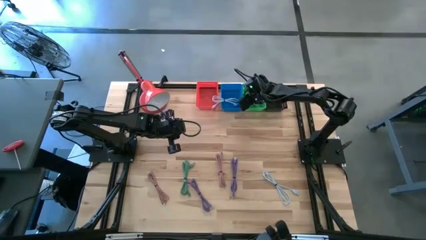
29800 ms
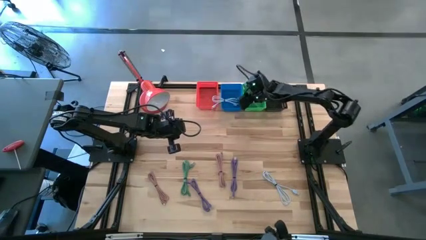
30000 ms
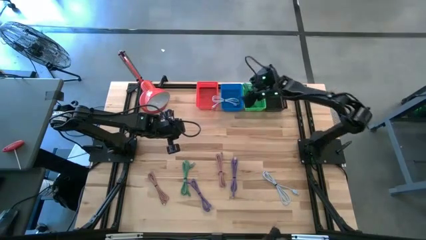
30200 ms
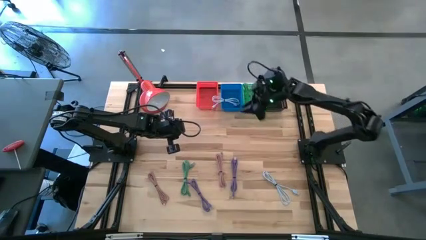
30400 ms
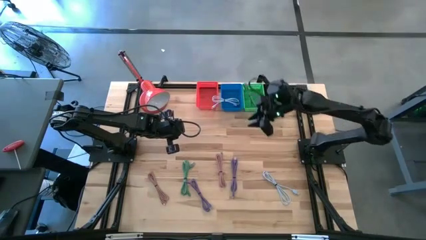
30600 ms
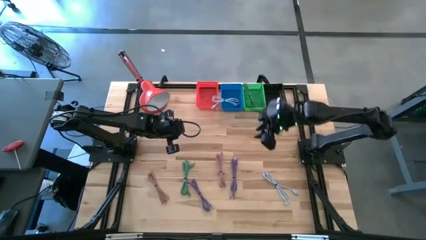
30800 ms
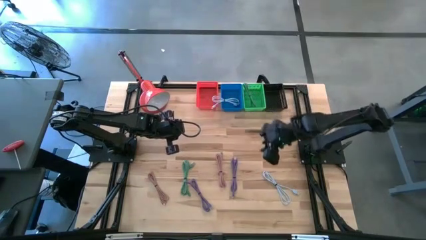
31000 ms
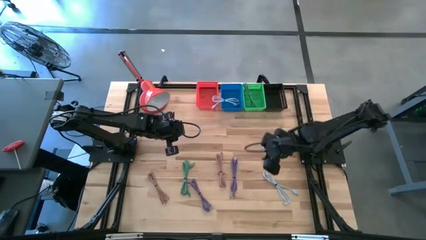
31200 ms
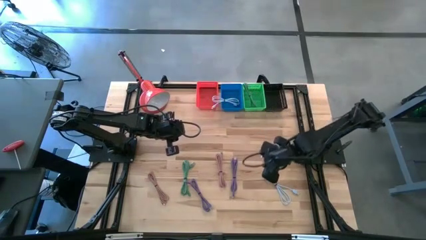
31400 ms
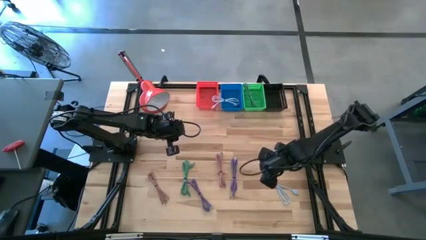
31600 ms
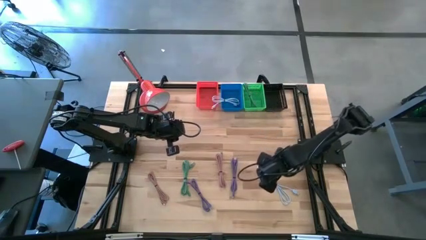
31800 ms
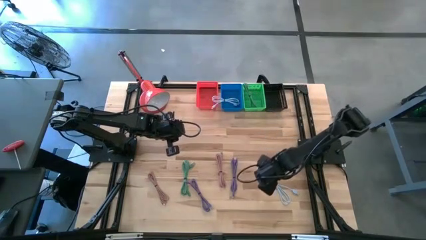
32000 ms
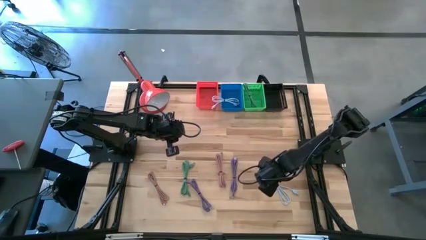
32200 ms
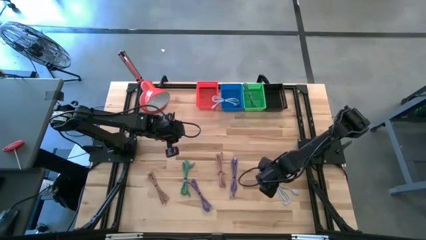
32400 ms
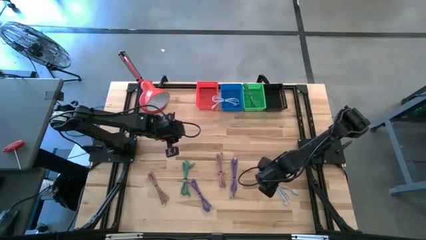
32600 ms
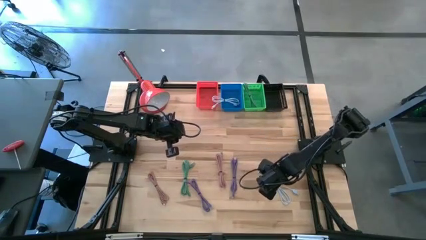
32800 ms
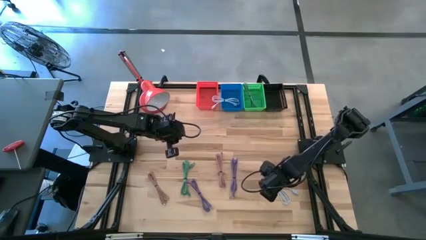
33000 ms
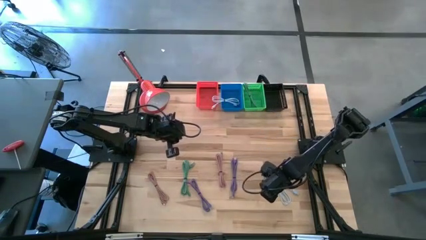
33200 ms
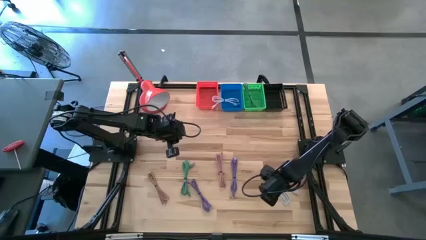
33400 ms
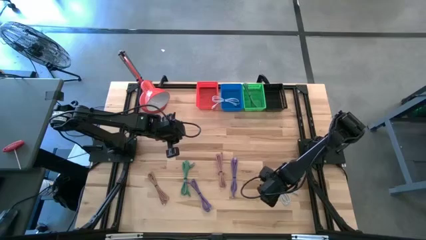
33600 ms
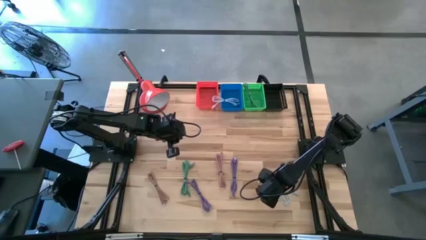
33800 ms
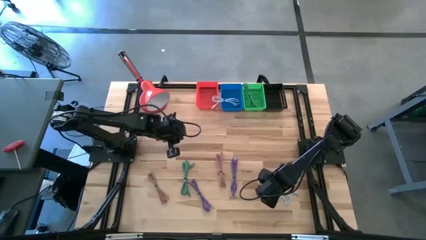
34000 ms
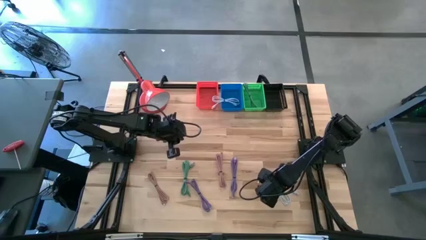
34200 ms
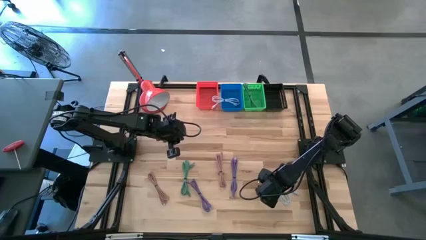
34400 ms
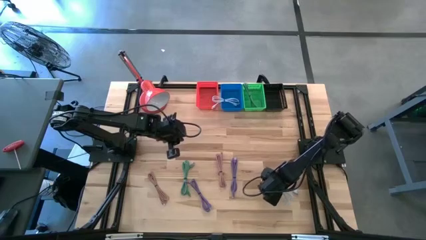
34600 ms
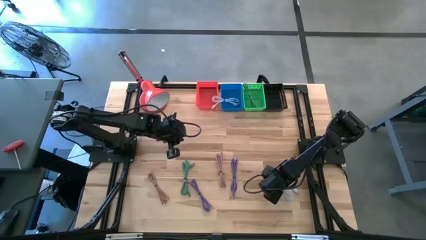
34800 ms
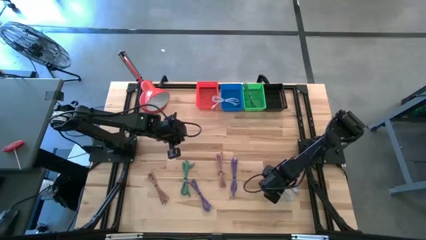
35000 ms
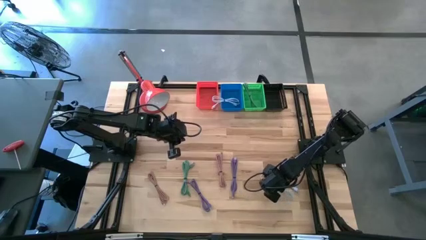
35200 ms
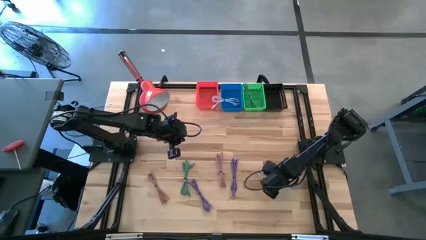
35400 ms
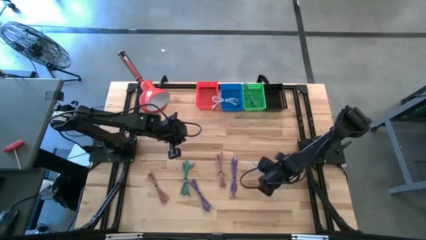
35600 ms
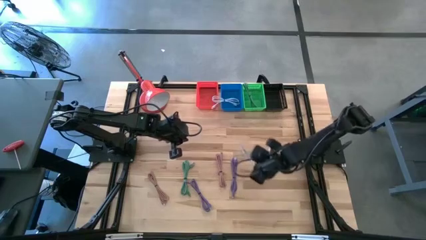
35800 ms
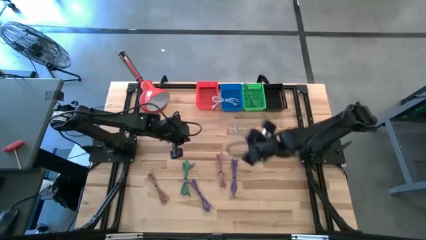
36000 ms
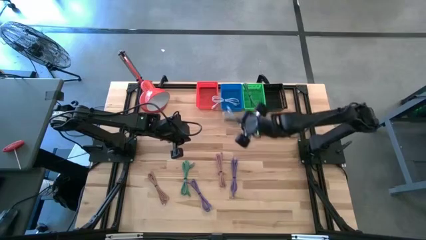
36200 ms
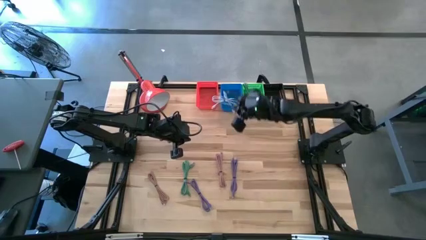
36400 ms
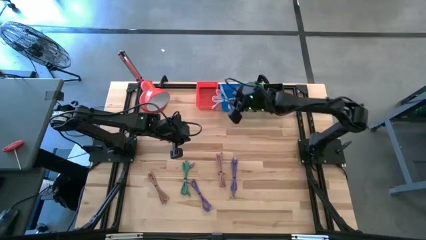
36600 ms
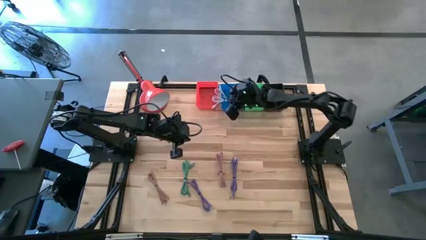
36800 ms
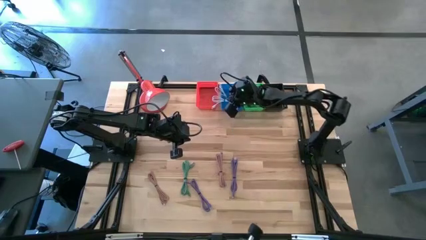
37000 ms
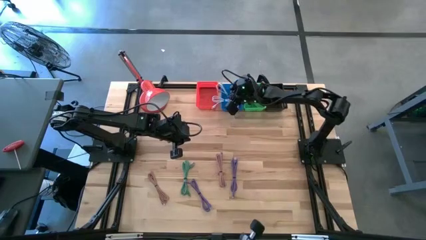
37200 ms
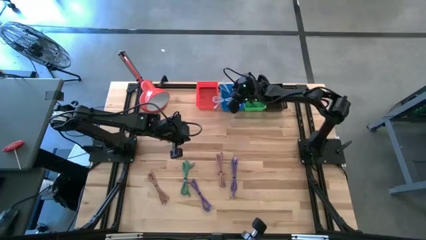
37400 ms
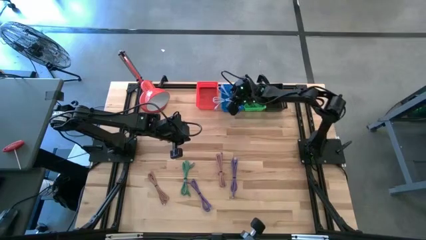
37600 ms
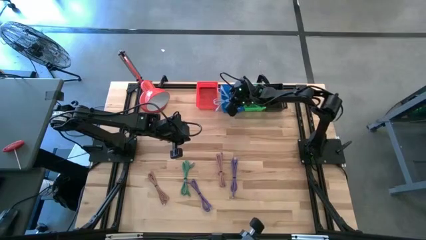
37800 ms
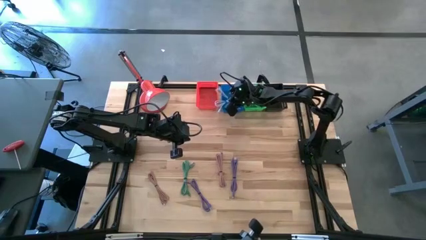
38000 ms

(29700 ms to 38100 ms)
Task: Pick & Place USB Port
Put the blue charger cable into the blue bin

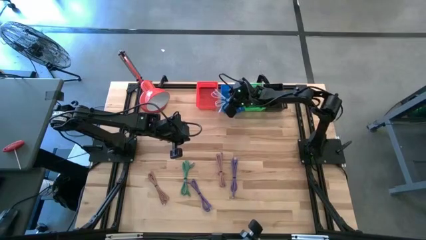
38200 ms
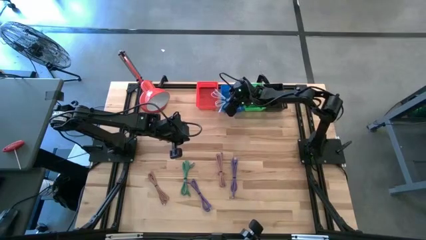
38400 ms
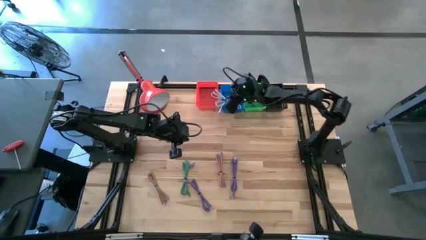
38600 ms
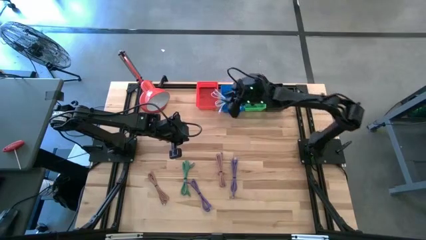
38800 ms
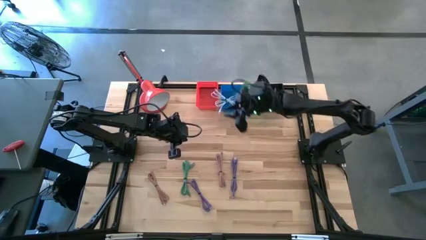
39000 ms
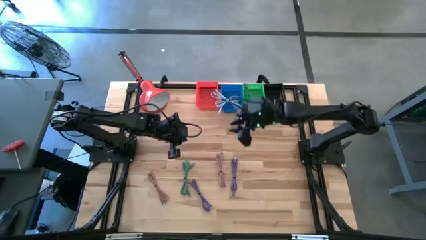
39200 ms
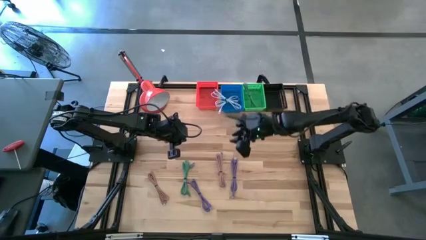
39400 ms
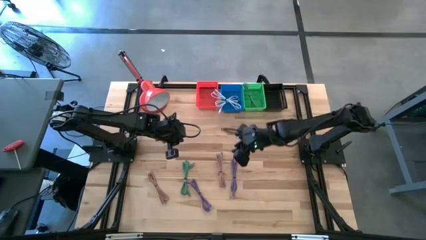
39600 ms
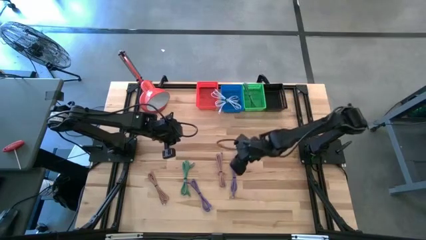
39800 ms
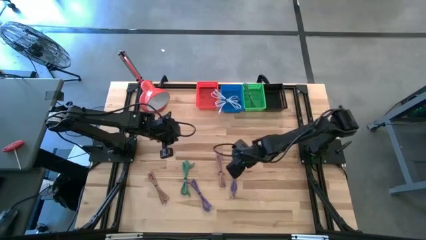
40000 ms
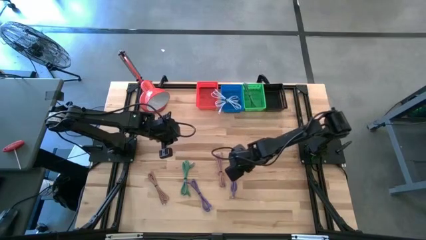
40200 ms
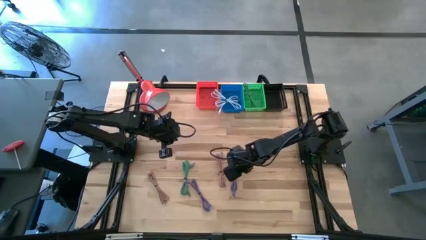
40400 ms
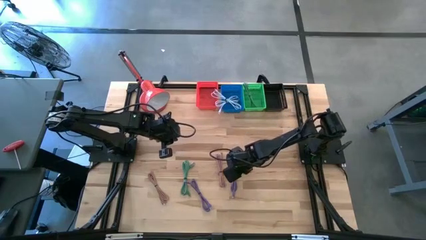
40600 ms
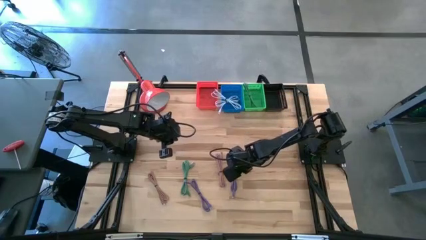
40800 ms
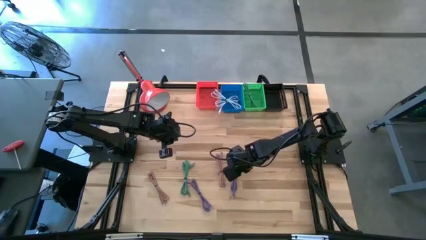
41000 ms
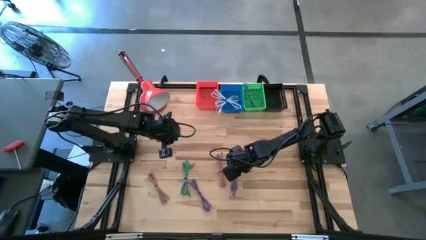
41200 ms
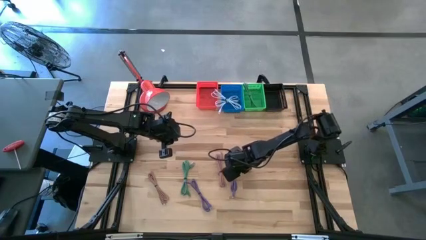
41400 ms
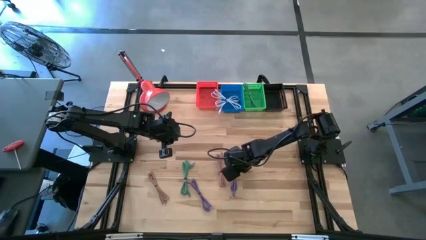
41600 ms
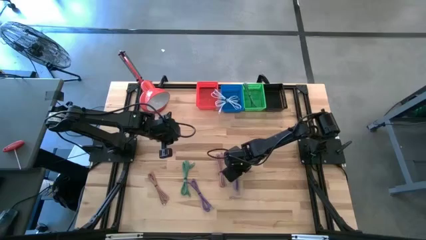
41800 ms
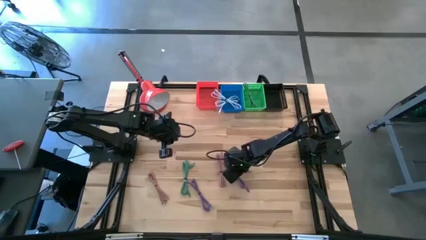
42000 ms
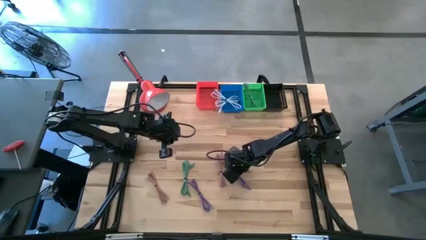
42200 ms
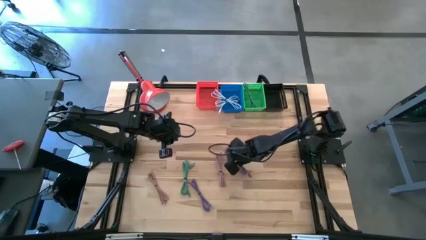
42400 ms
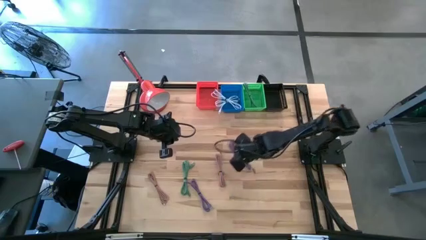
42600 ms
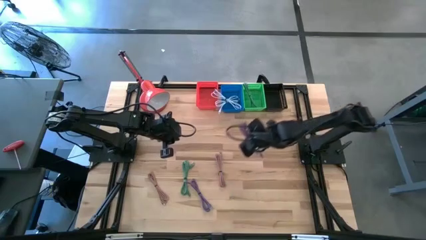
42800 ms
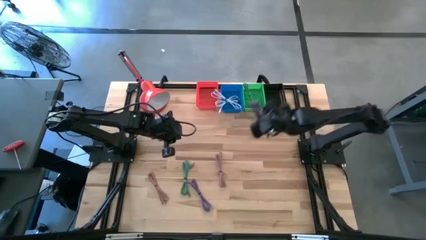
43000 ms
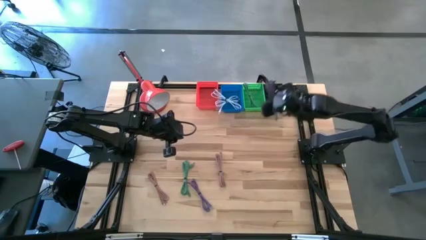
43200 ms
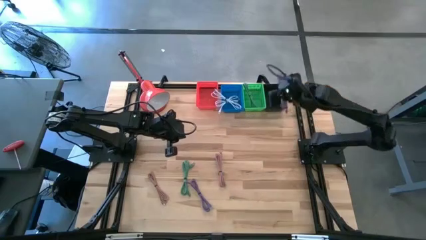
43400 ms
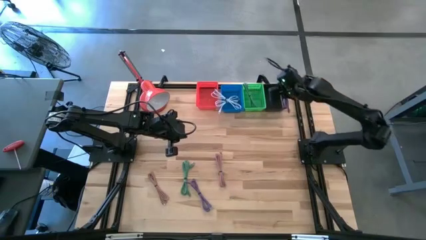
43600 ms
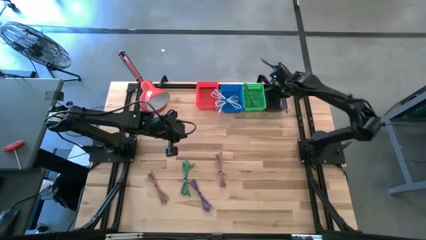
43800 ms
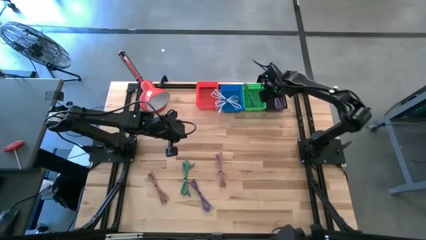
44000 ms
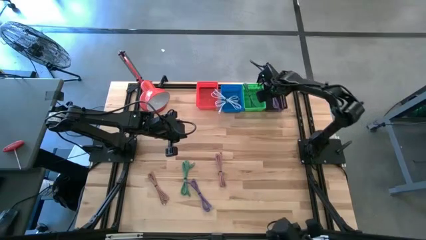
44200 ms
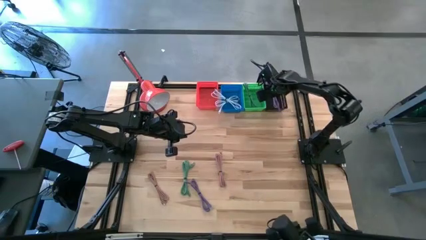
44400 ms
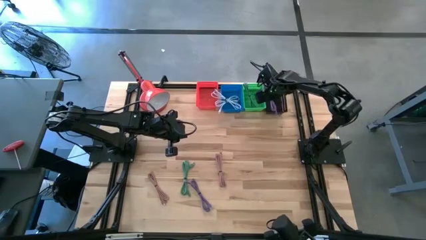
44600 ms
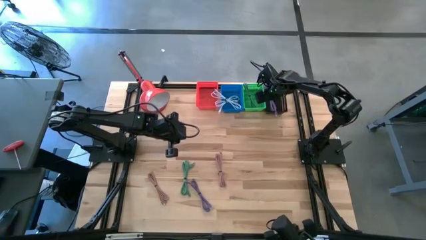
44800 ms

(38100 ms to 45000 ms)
Put the right purple charger cable into the black bin

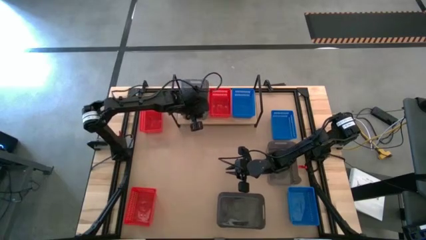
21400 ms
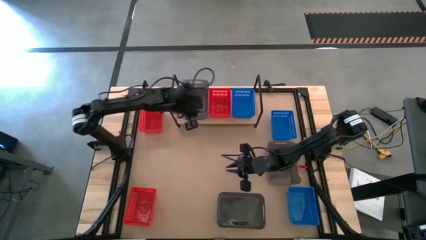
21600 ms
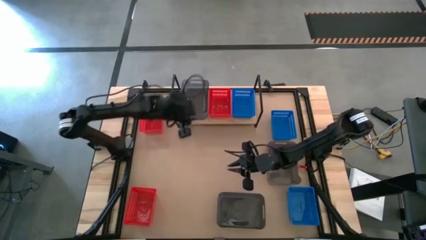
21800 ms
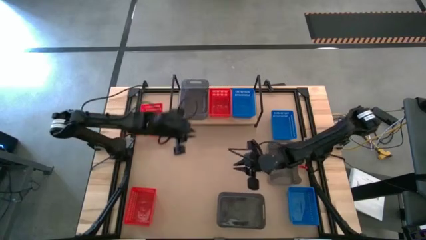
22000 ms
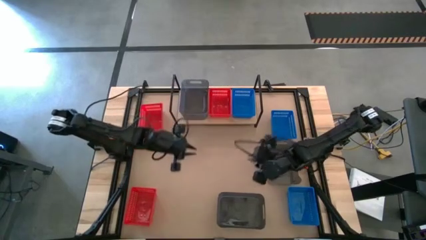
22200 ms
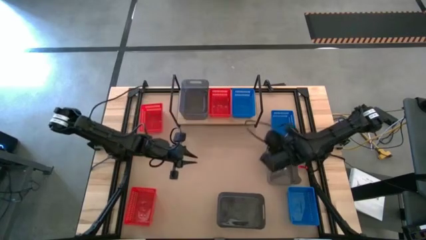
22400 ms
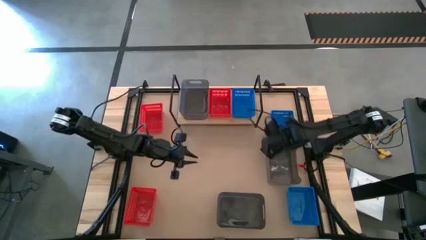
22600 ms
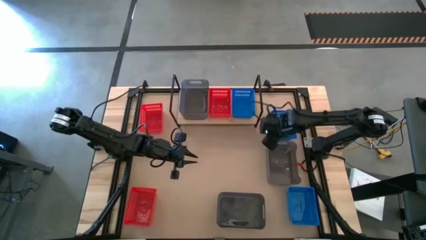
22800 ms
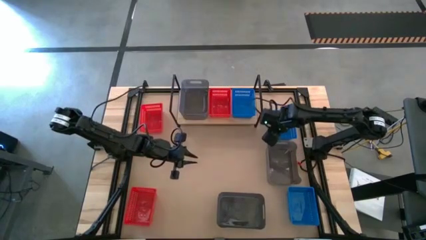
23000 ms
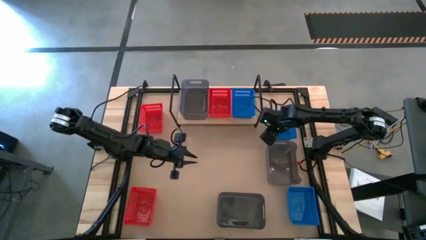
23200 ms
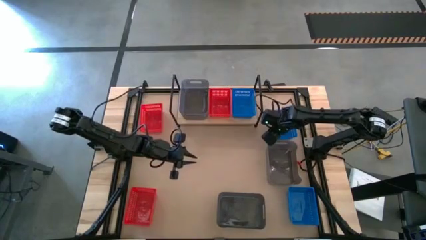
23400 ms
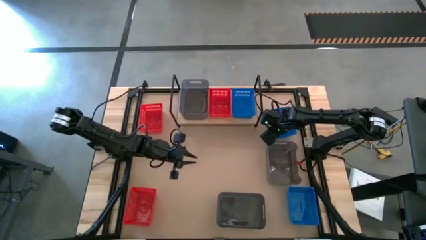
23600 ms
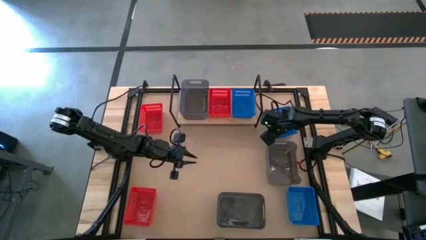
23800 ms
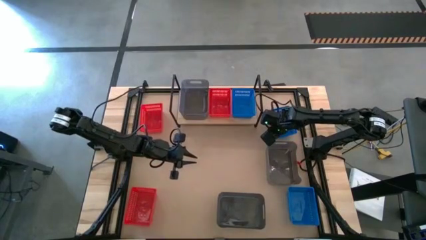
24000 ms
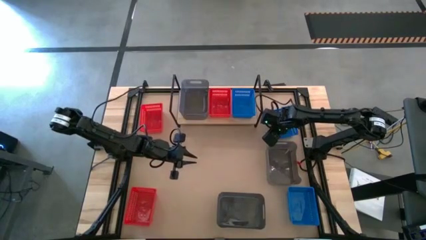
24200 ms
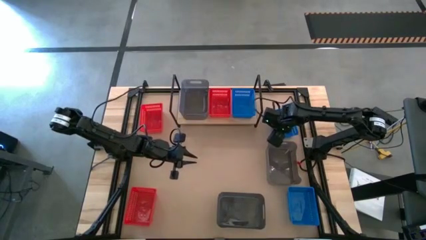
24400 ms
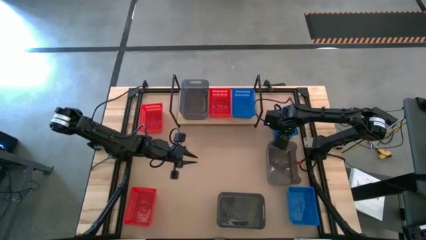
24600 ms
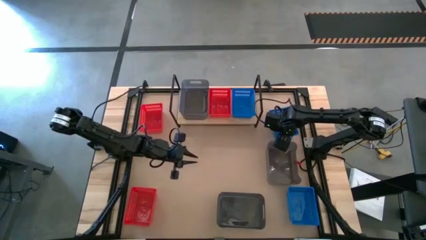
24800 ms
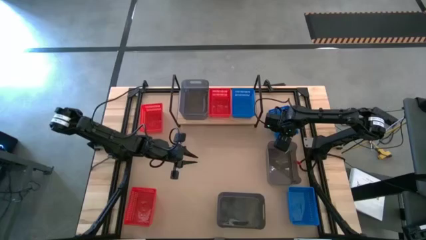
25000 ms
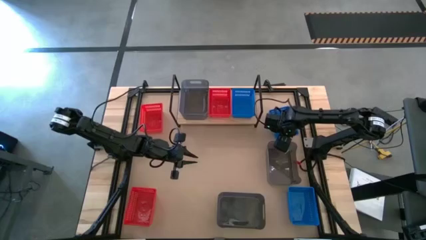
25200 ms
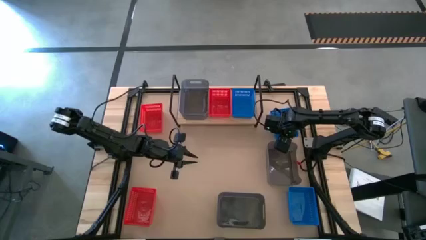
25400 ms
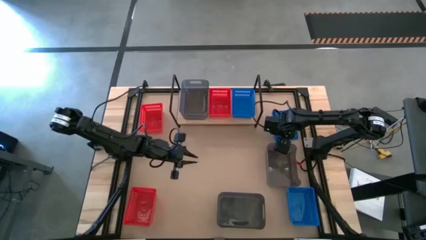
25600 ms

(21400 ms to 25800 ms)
Task: Stack baskets on shelf by color
Stack the top blue bin on the other blue bin on the shelf
